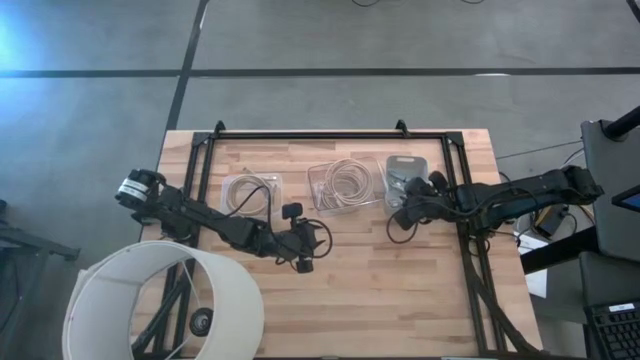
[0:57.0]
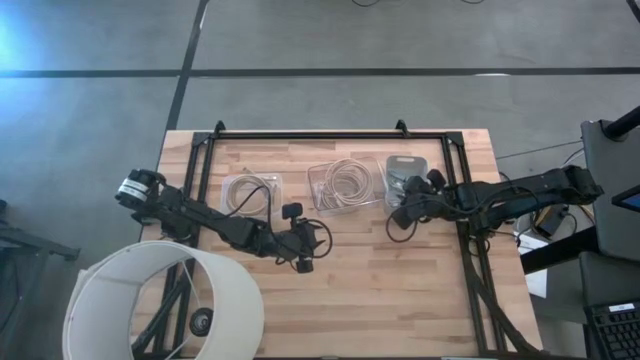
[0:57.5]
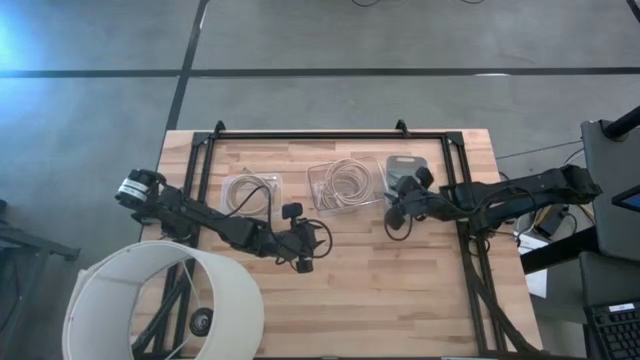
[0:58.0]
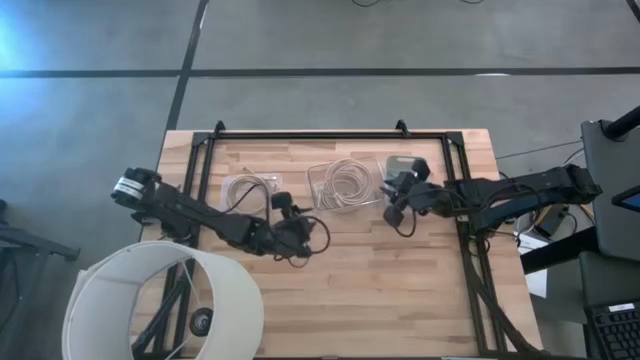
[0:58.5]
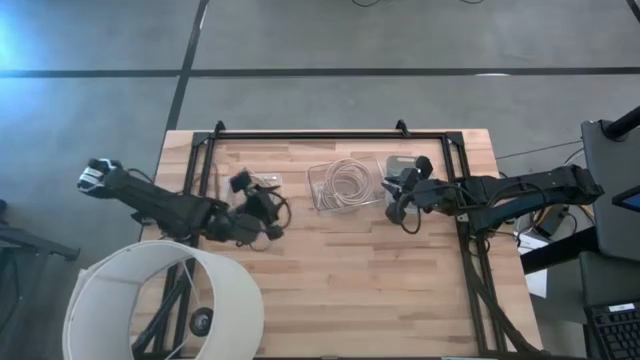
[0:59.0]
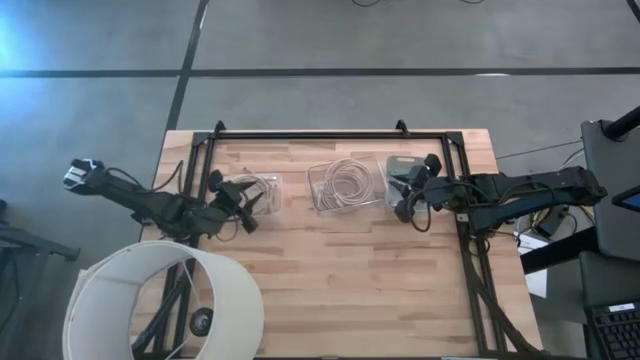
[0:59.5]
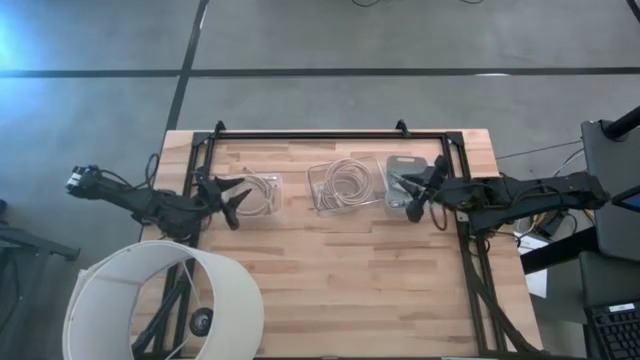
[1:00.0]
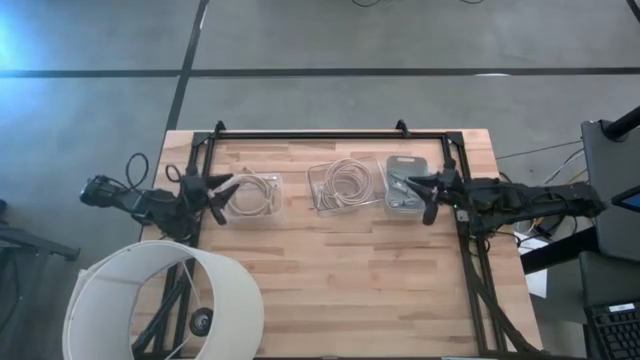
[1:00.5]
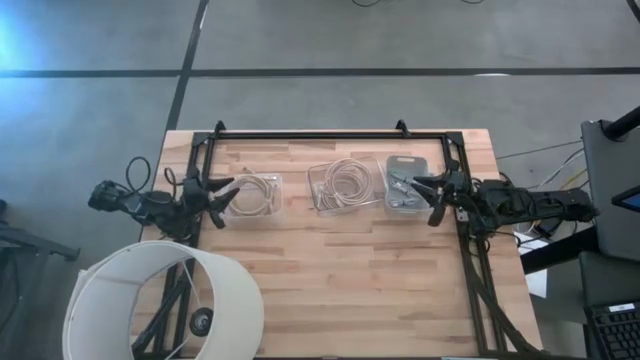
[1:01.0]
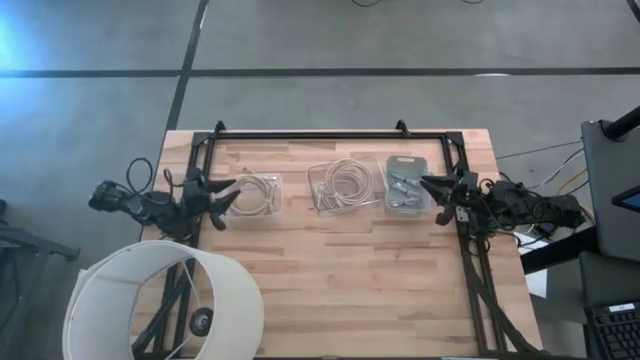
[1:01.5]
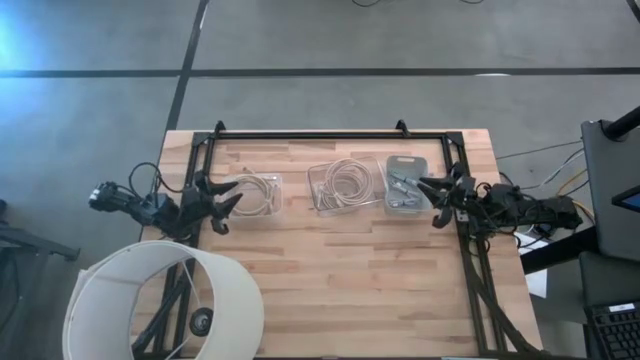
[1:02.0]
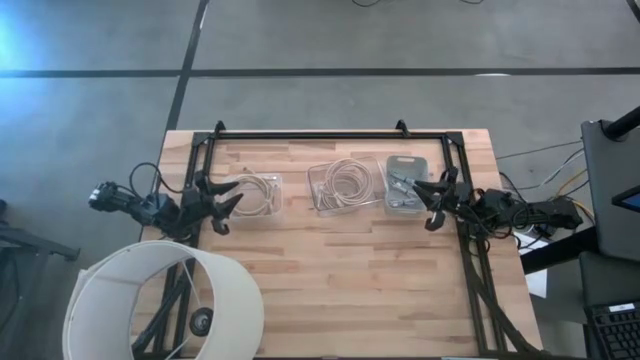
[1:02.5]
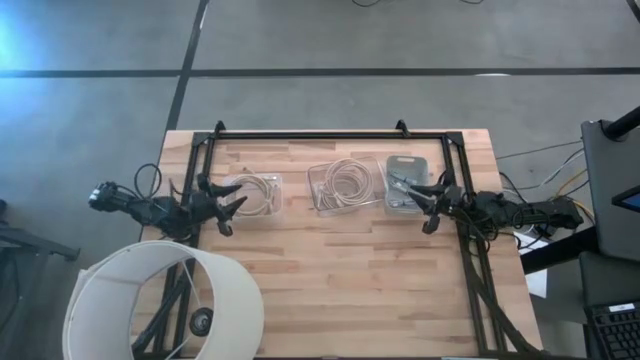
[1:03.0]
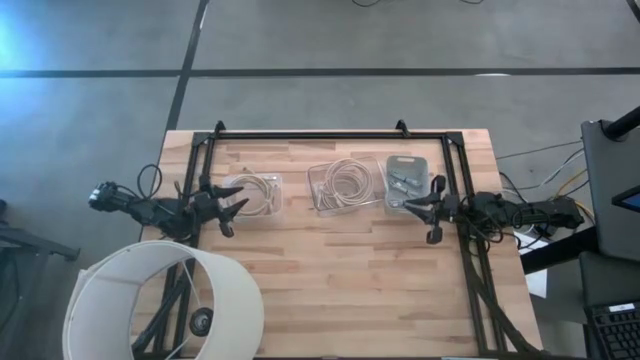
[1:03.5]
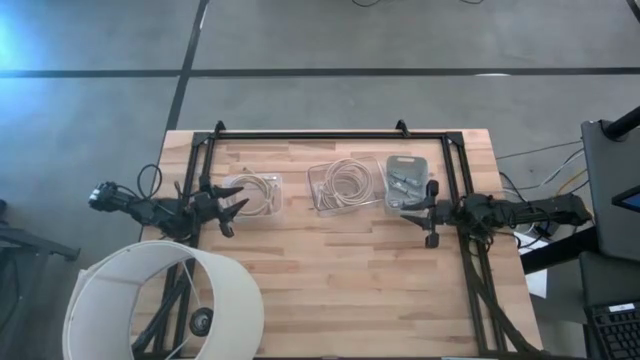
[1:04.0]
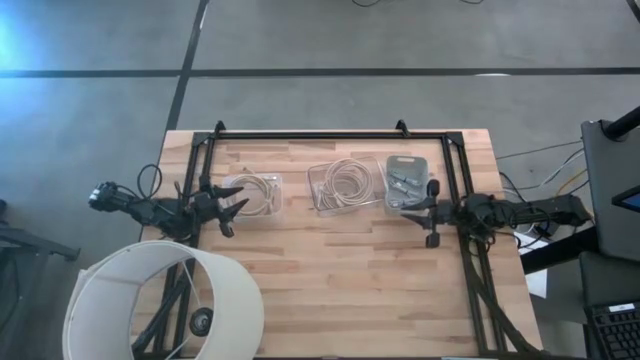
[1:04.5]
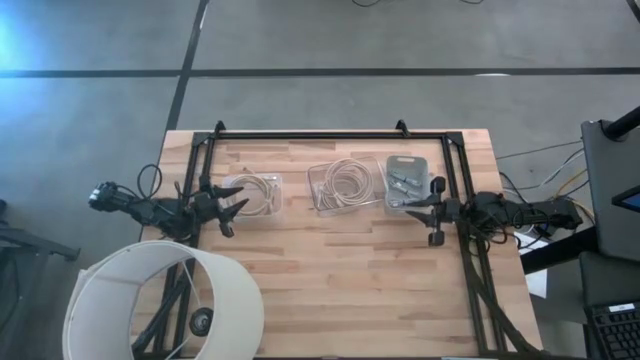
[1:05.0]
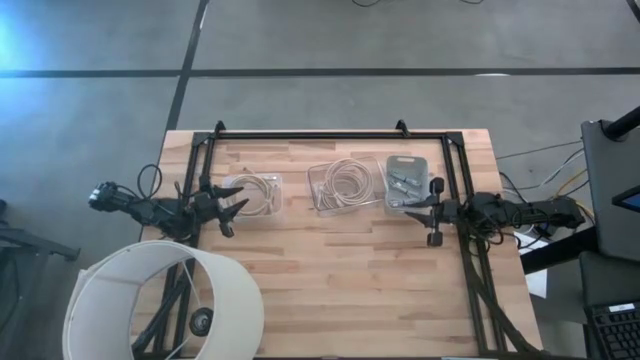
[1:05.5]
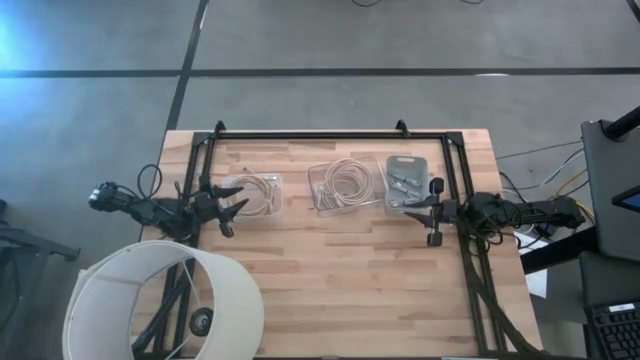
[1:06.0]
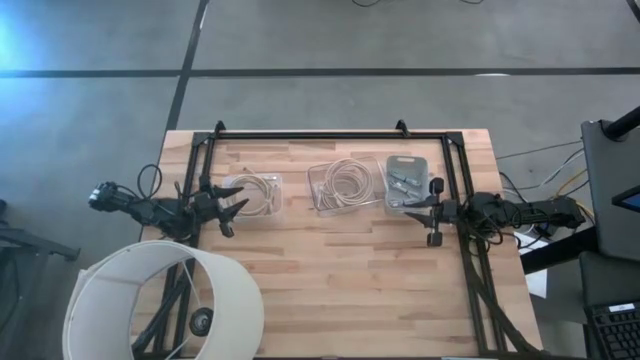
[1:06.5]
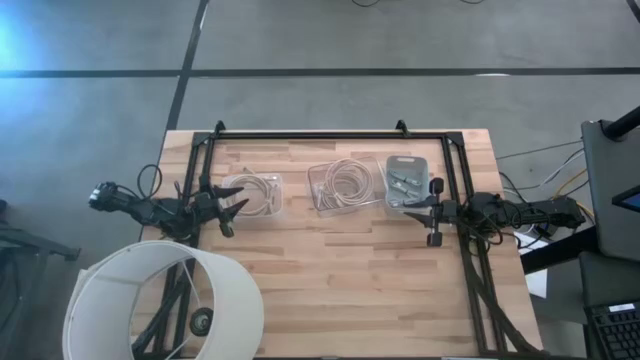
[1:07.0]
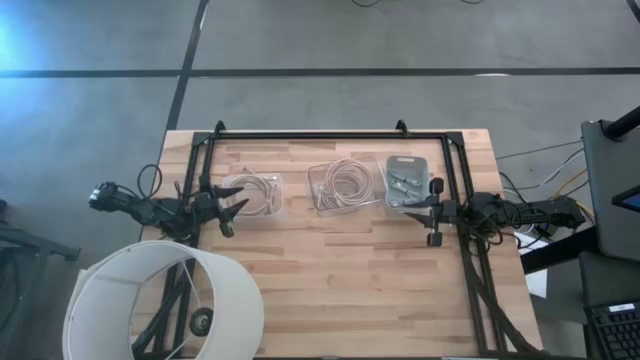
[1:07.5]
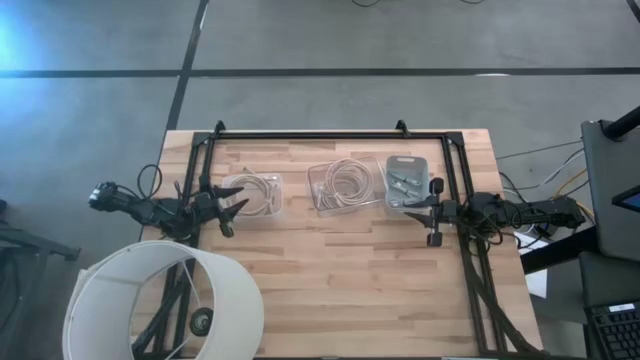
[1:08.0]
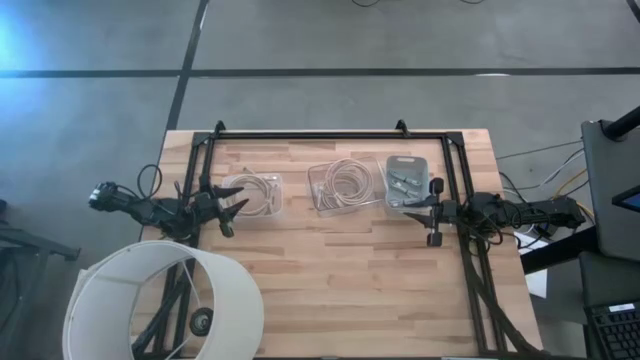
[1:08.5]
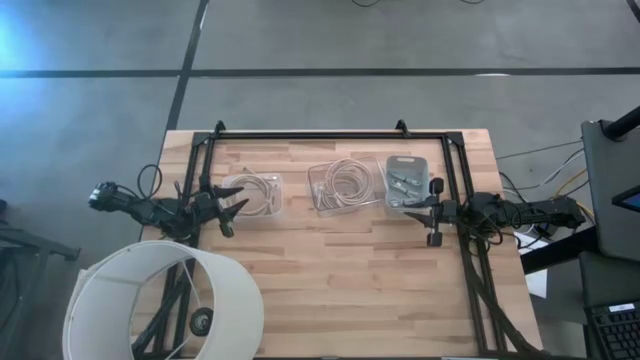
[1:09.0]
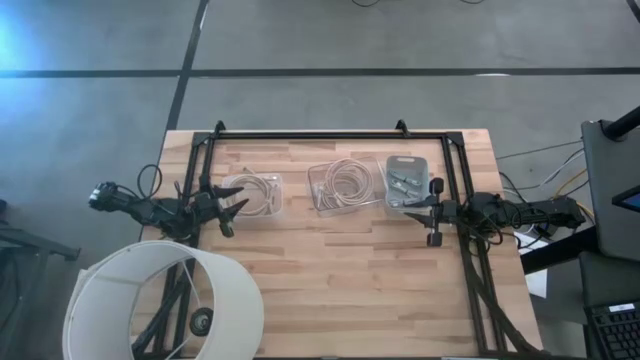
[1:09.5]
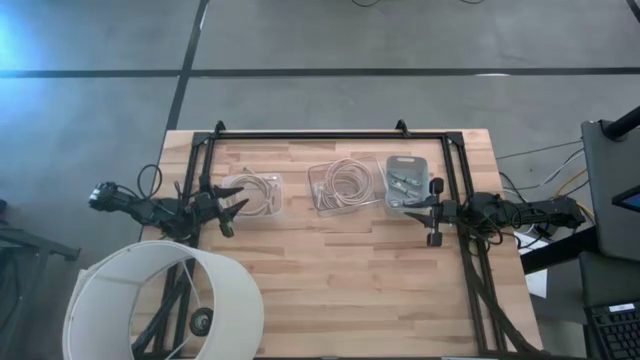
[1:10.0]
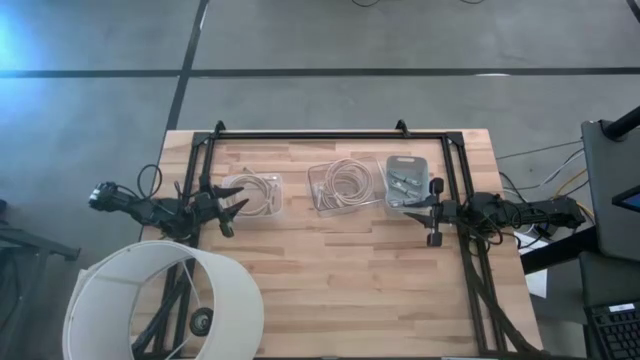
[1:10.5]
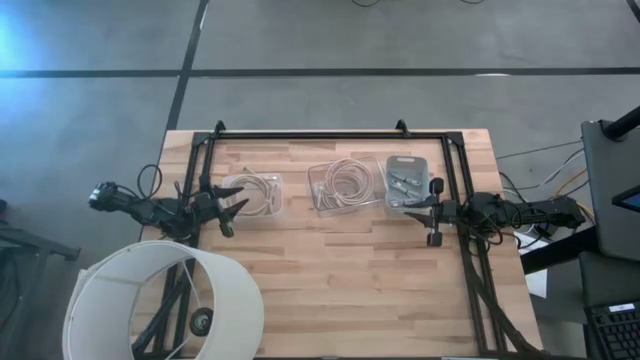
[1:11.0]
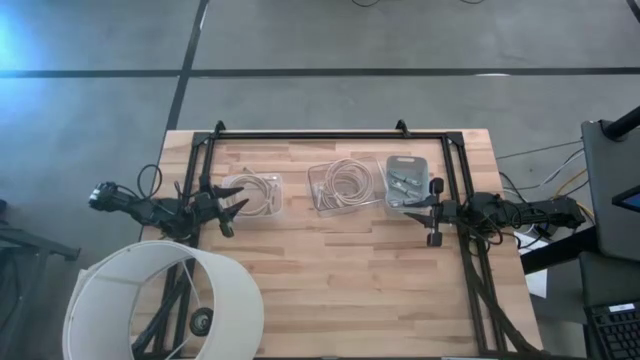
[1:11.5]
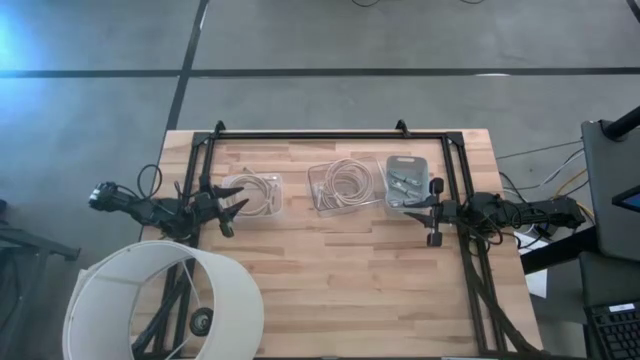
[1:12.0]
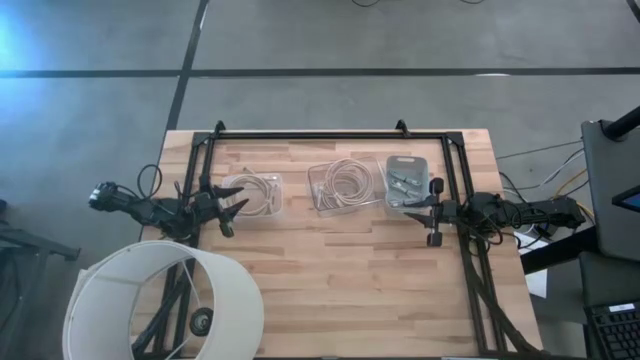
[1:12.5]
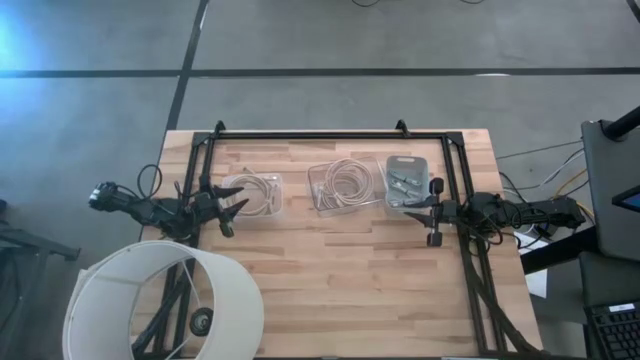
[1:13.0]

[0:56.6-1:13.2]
Task: Pick & Place USB Port
Return to Home Position

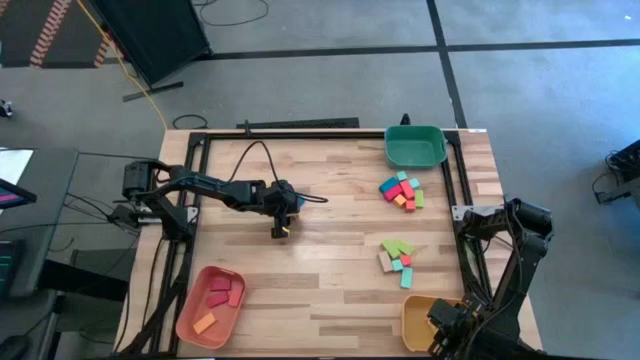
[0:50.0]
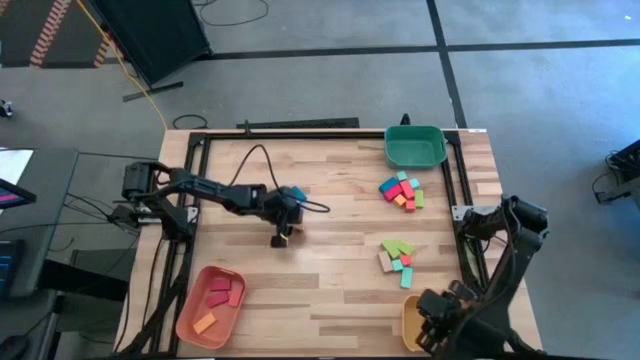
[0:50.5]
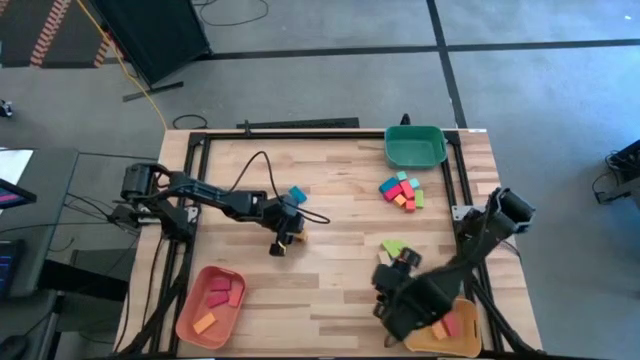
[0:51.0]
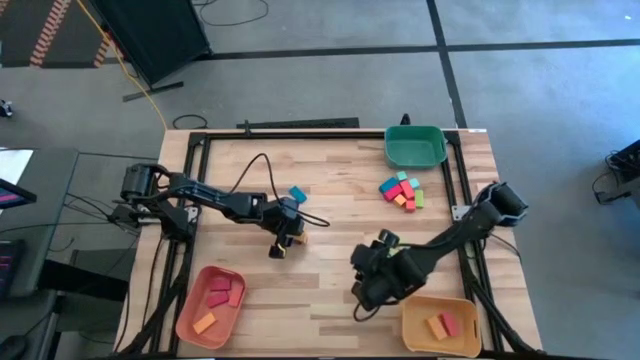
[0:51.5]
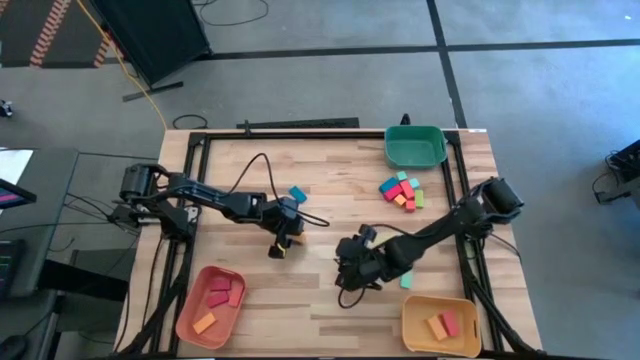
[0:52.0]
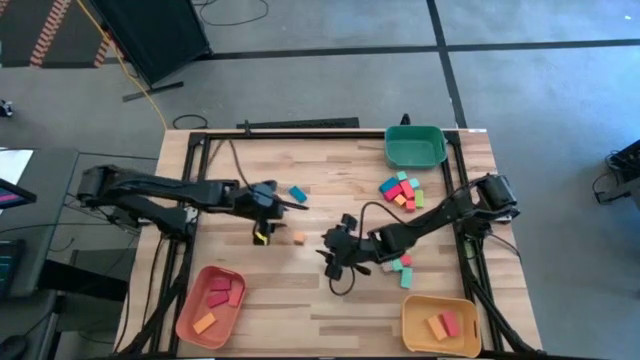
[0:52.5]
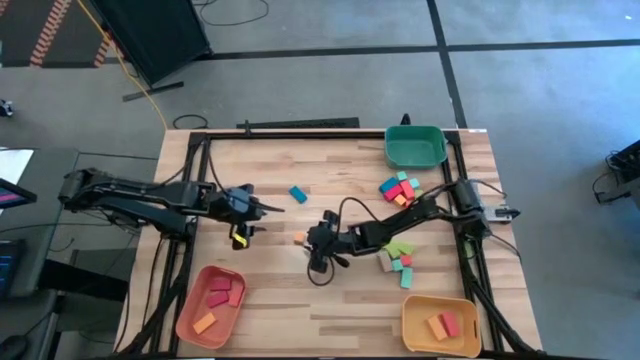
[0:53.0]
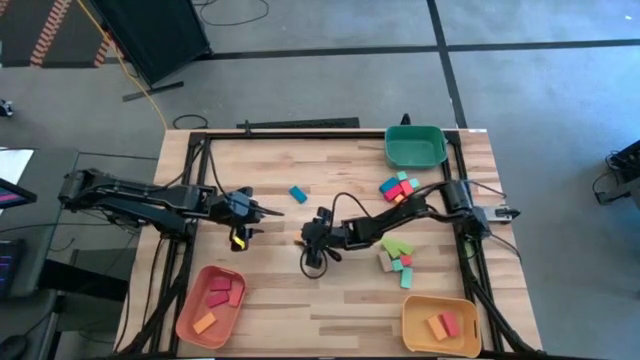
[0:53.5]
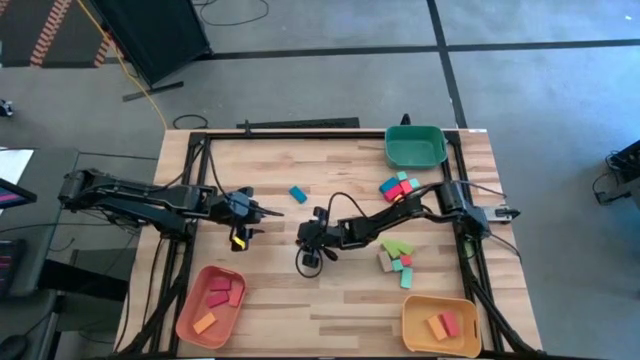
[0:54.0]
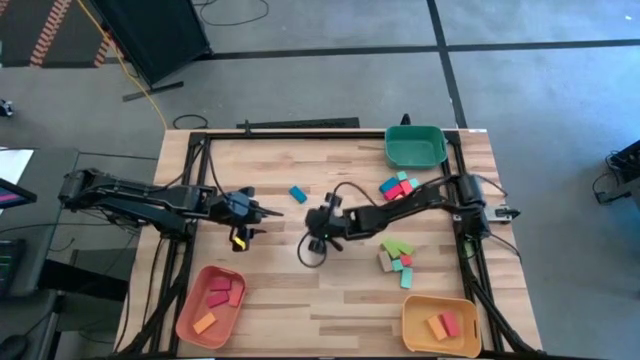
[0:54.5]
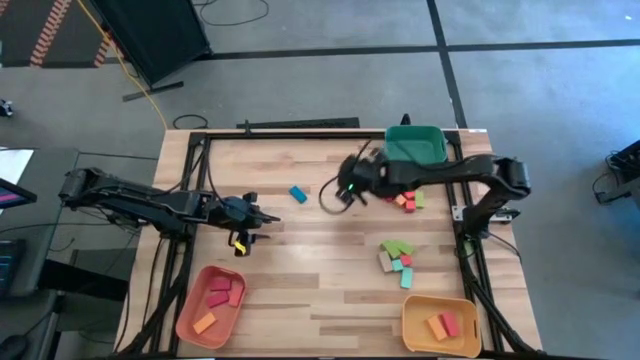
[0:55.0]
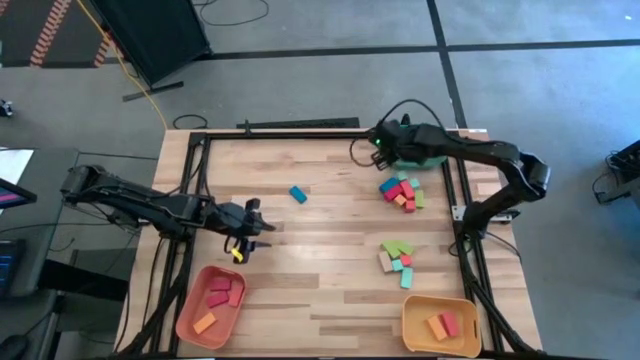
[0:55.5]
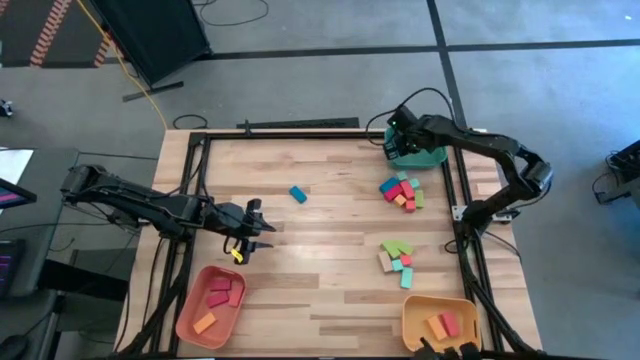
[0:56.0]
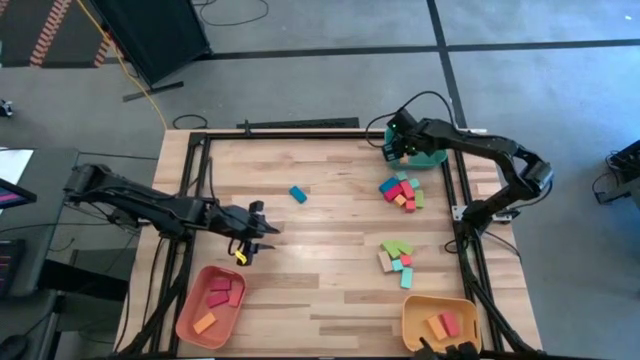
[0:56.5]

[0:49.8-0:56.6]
Task: Sort blocks by size
Put the small yellow square block into the green bin
